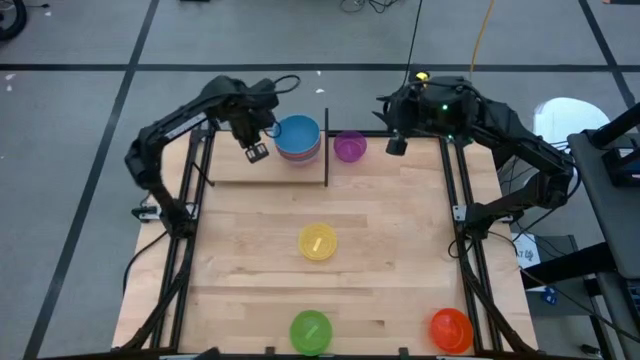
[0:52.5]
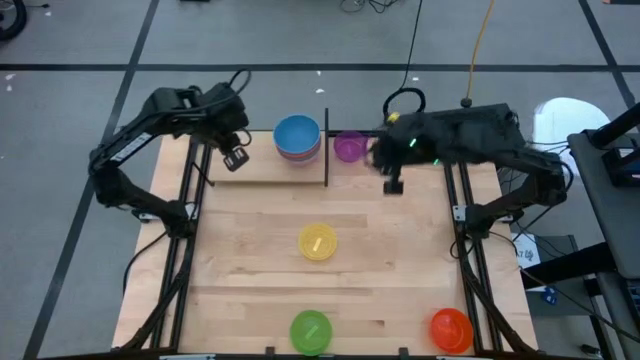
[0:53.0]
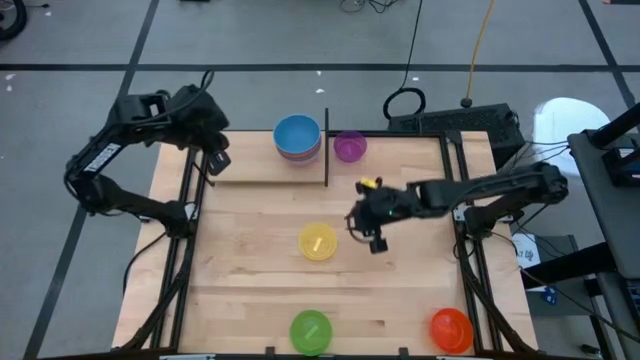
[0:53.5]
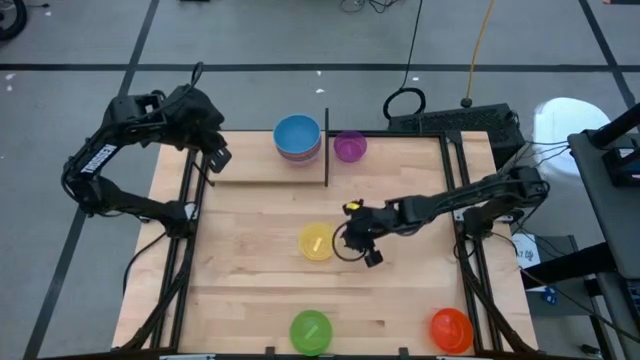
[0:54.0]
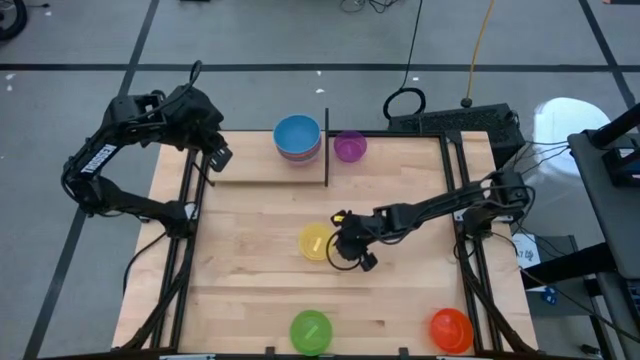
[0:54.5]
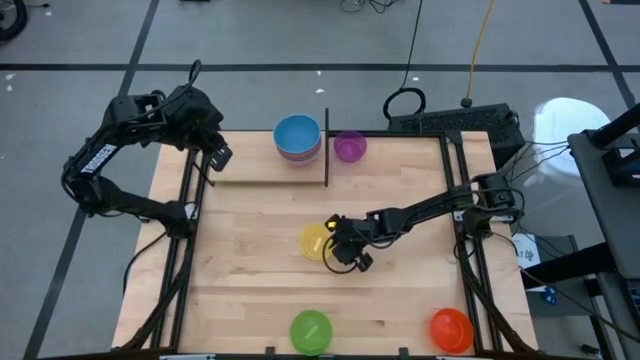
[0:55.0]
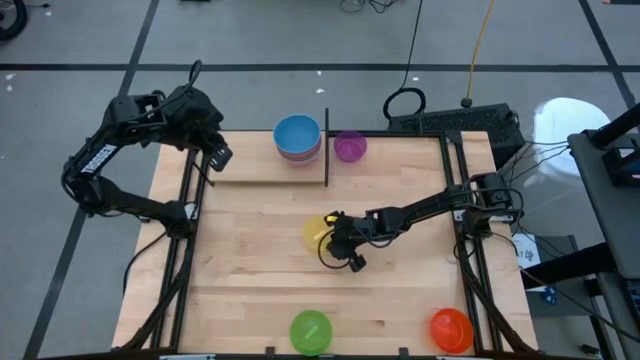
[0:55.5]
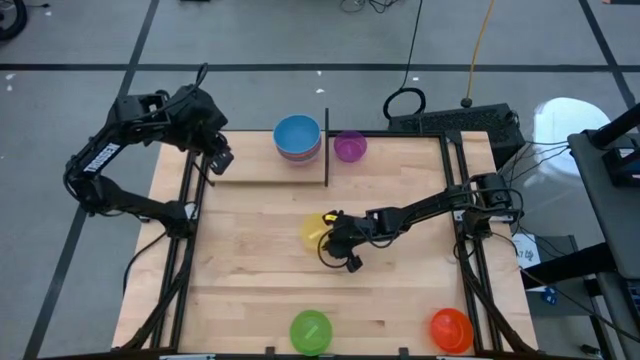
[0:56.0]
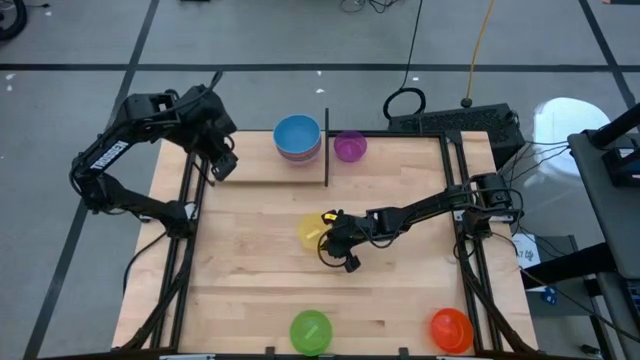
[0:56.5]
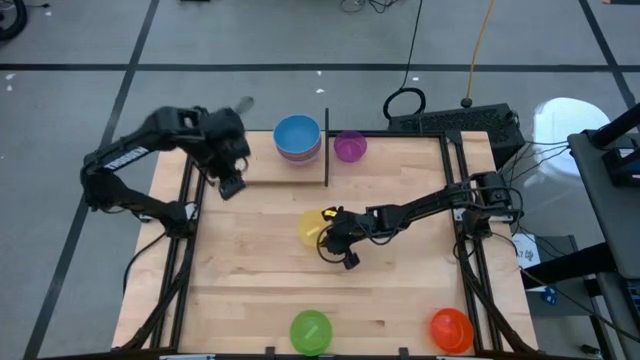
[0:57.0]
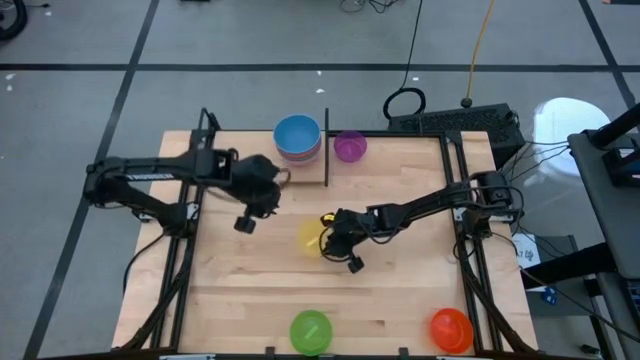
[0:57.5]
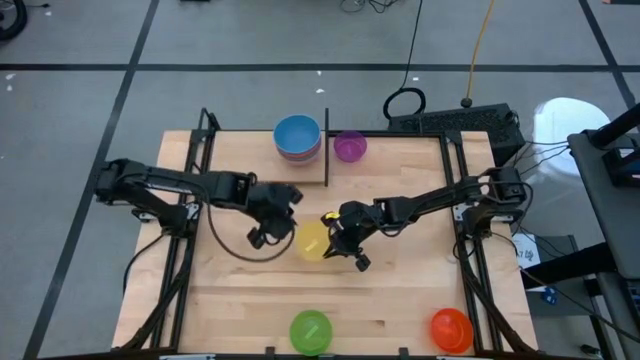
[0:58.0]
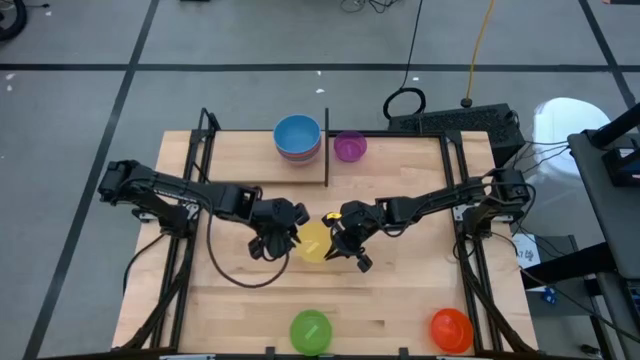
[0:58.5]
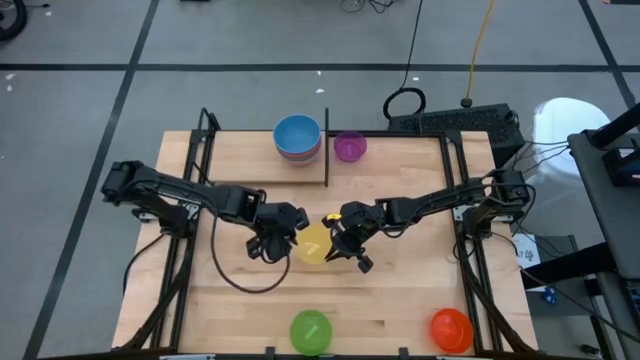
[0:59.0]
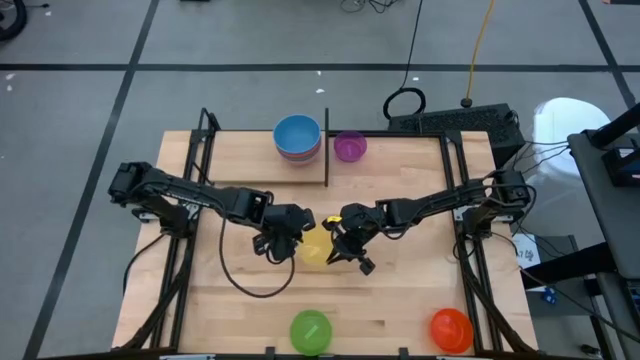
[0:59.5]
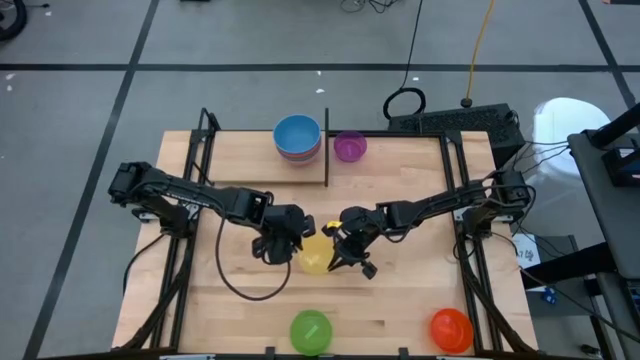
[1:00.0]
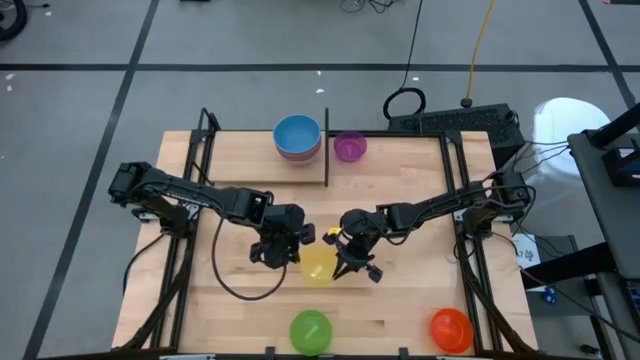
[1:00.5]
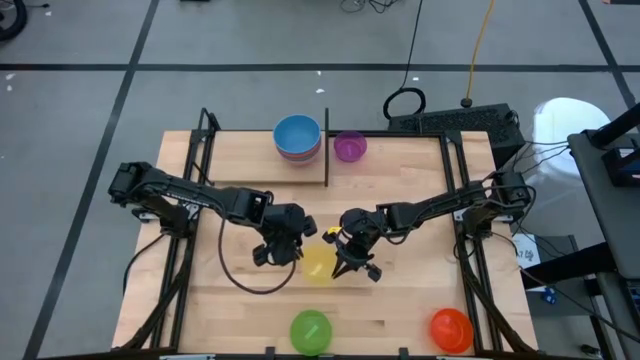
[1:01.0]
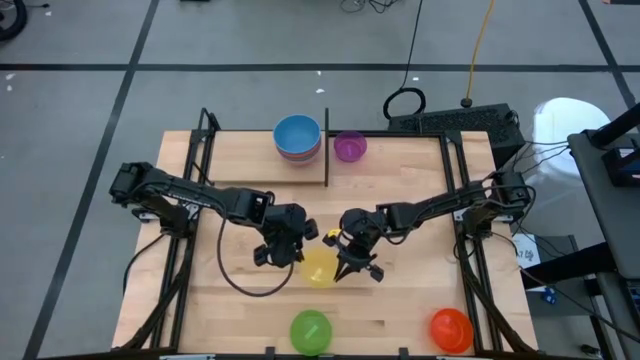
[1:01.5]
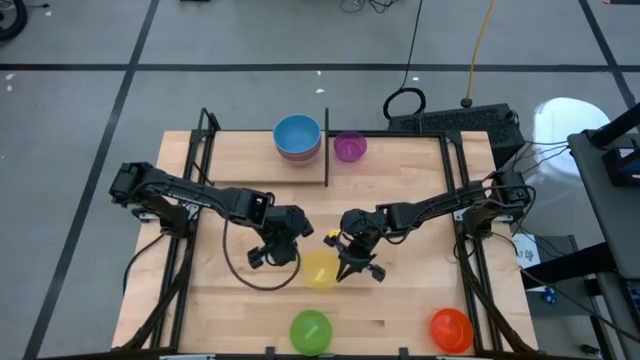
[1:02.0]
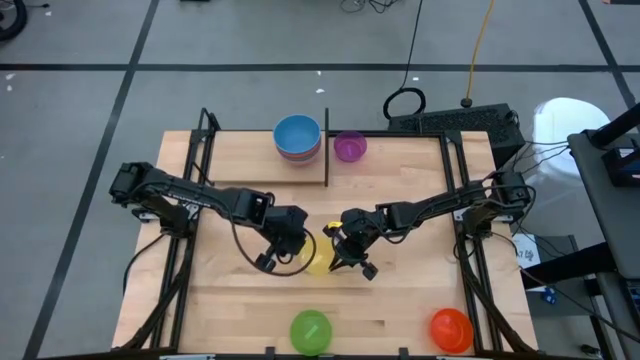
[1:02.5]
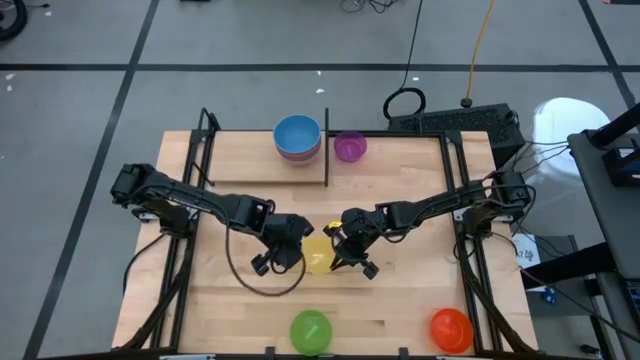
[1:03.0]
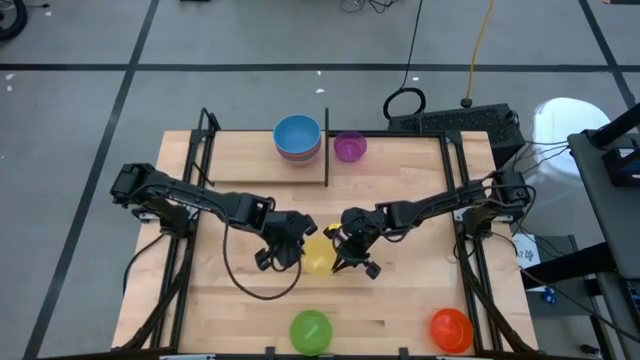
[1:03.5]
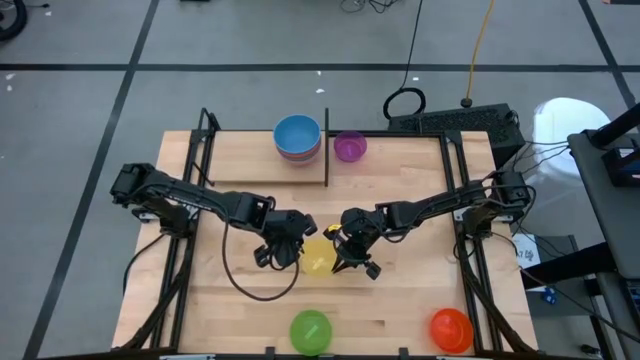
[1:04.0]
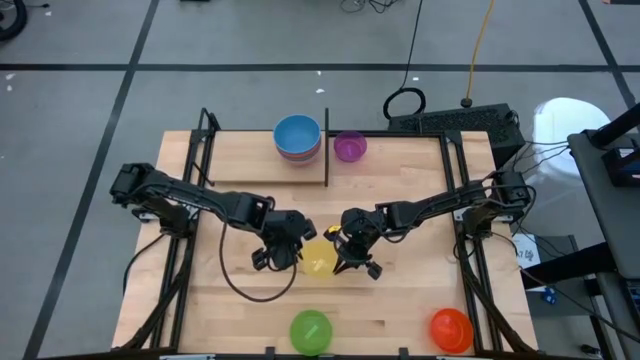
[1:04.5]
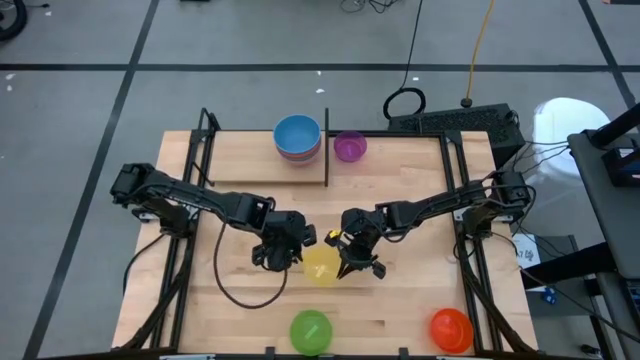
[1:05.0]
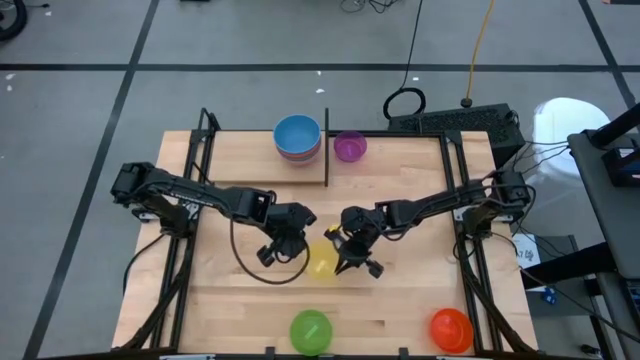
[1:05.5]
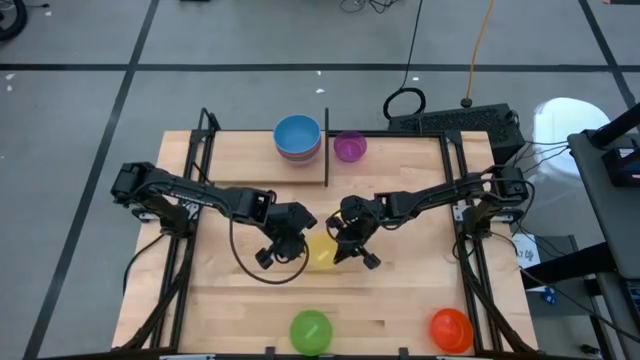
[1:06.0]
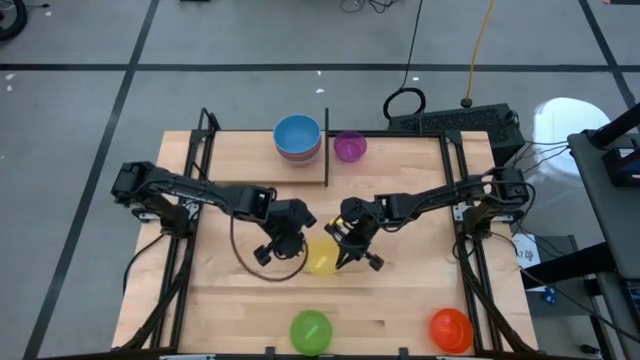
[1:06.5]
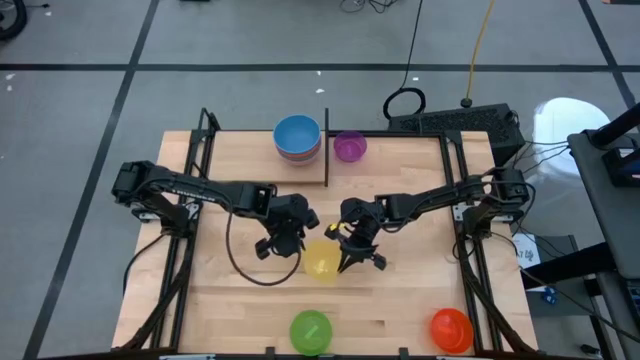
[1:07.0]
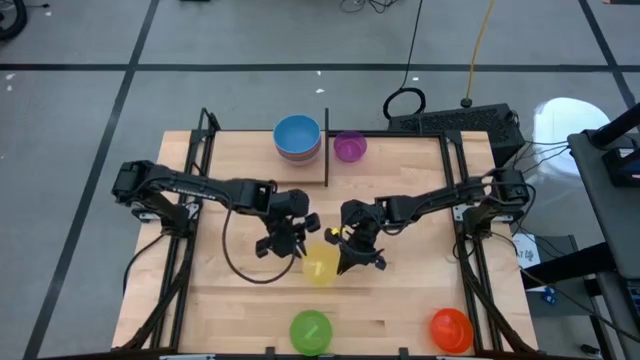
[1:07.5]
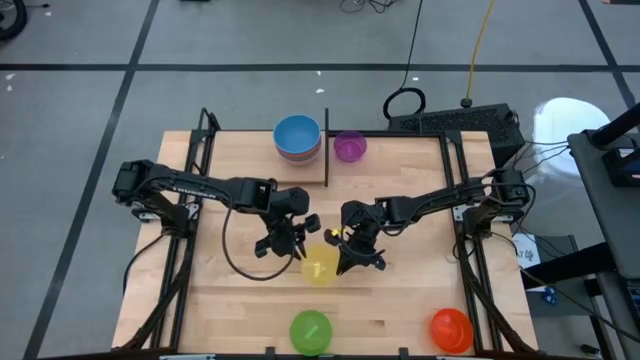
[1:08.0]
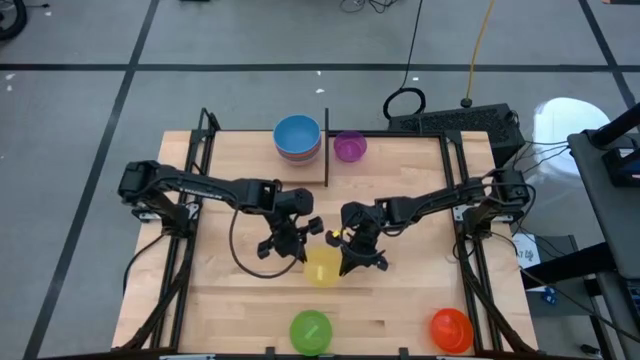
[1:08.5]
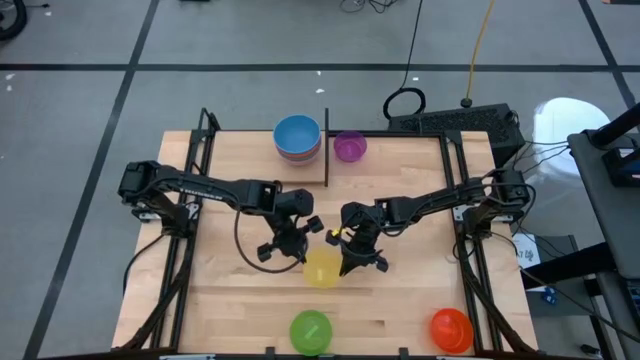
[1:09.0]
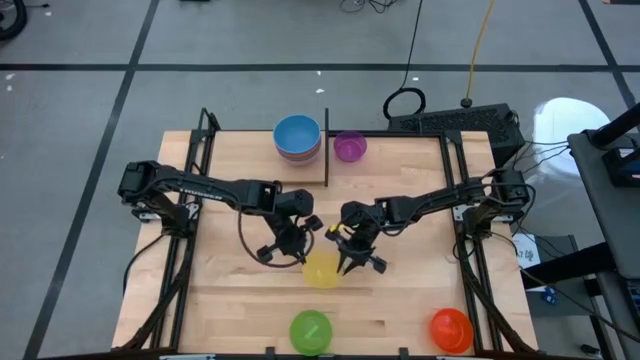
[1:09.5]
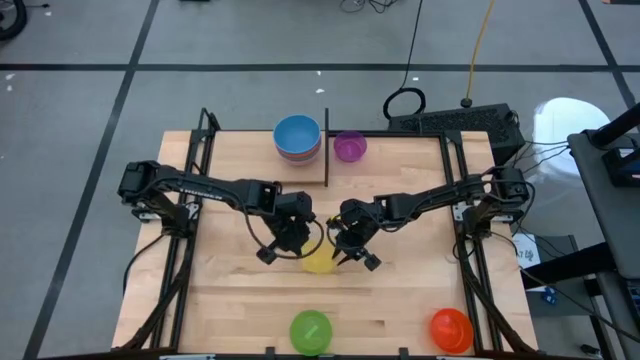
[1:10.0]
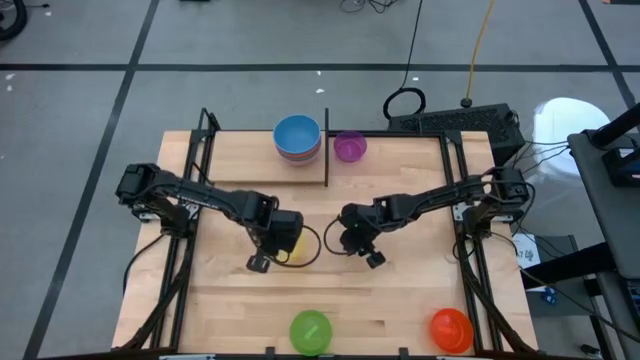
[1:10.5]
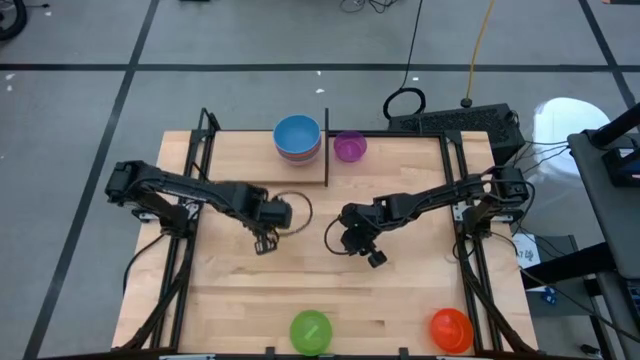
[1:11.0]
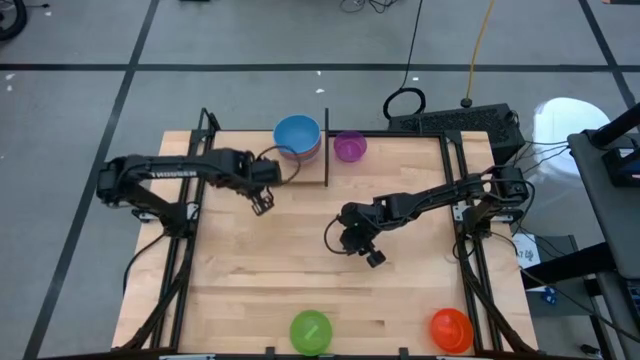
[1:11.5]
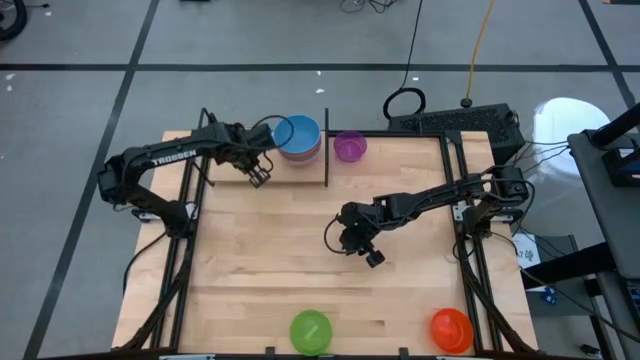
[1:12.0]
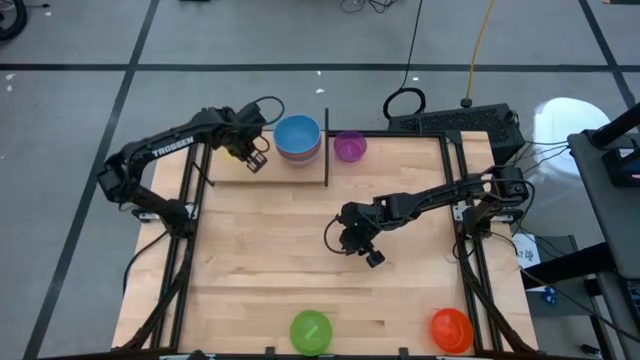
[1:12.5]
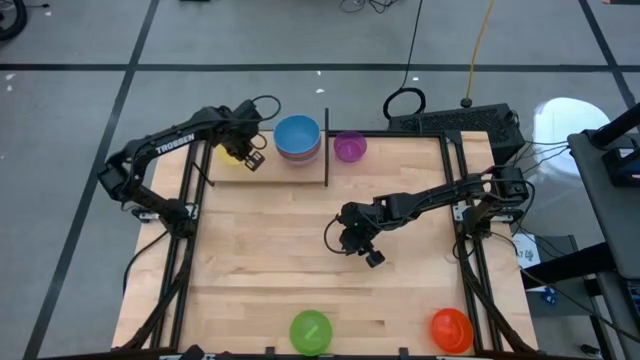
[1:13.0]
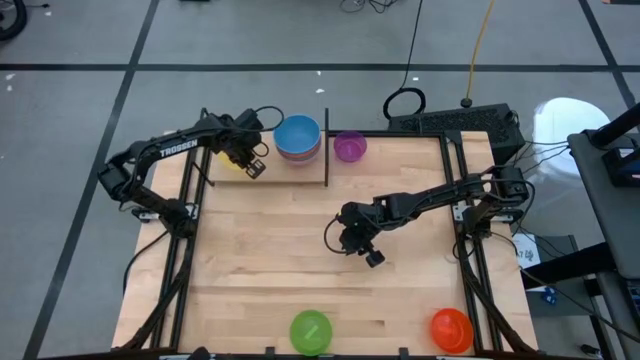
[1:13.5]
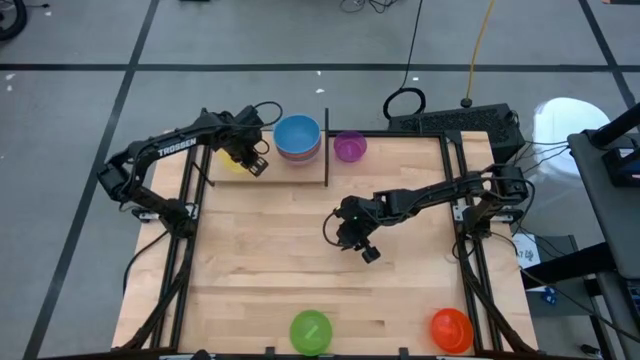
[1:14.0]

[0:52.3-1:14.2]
Task: Place and stack bowls onto a shelf
Put the small yellow bowl on the shelf
